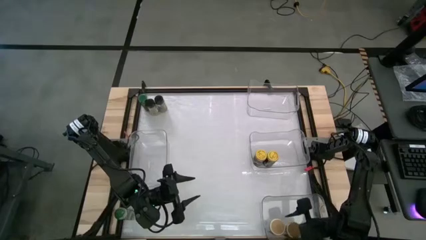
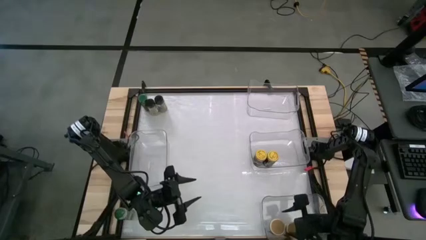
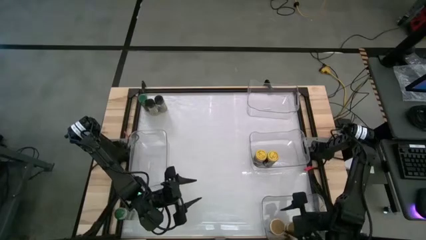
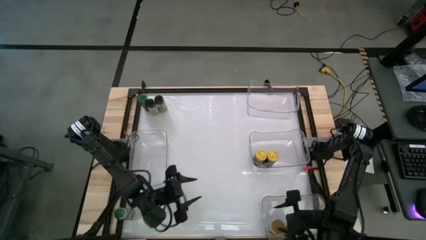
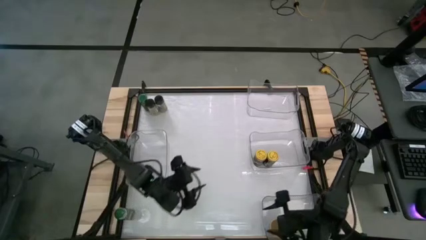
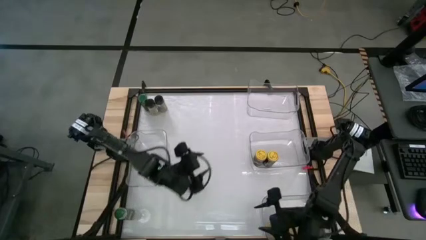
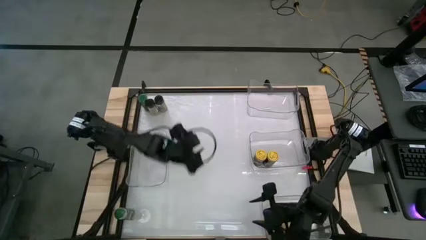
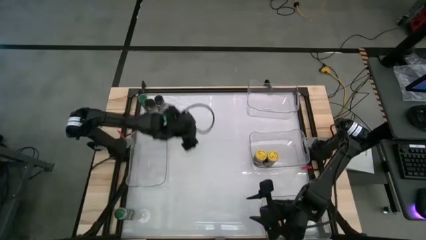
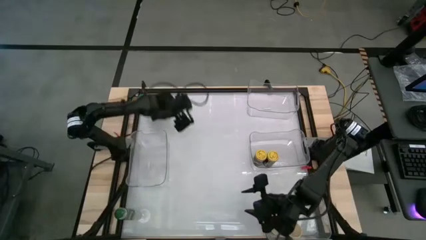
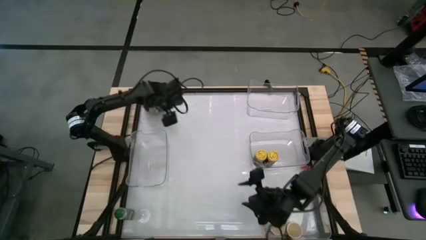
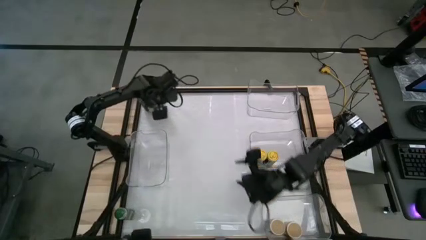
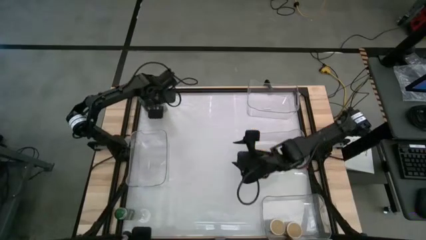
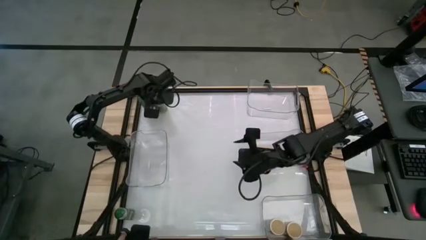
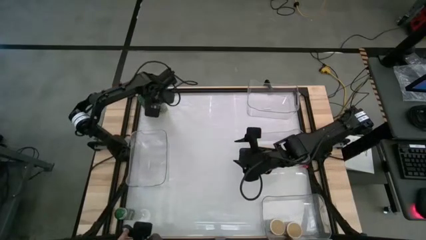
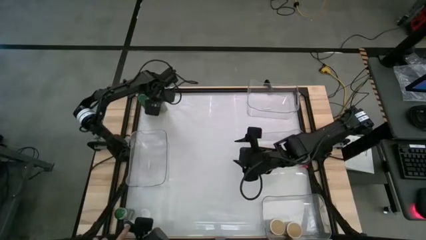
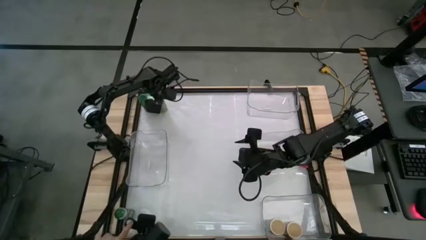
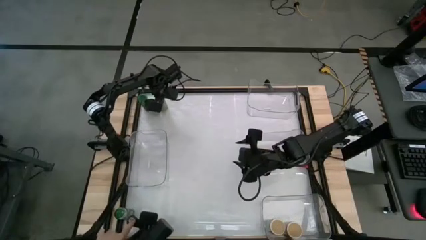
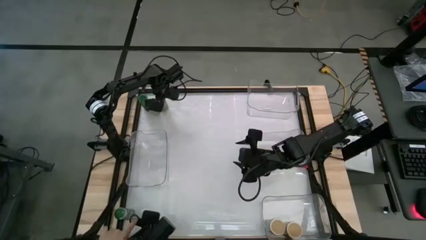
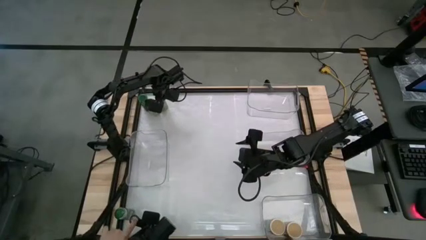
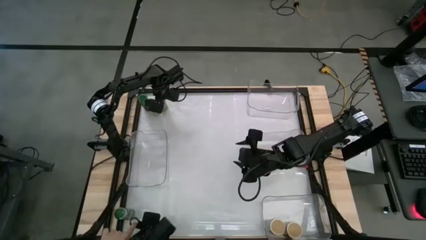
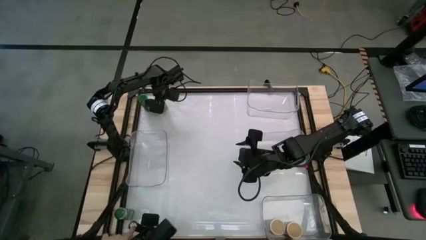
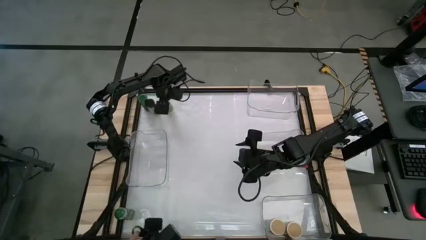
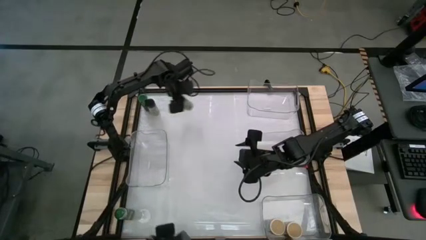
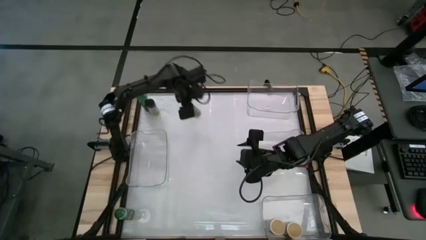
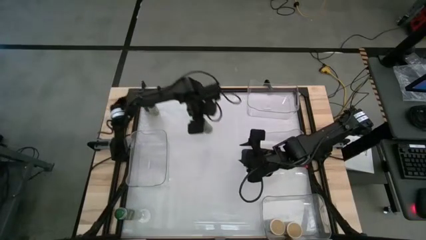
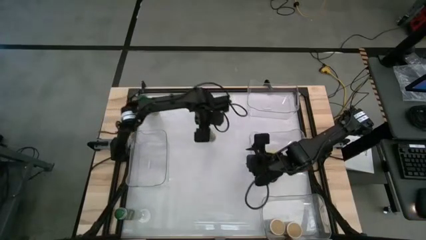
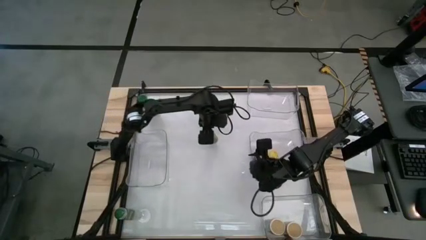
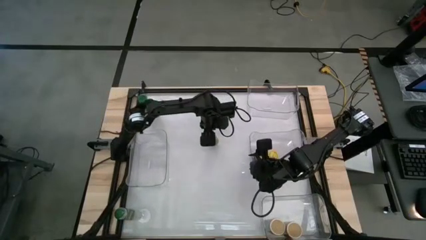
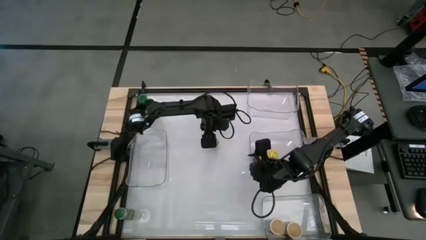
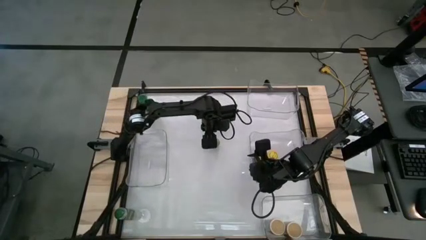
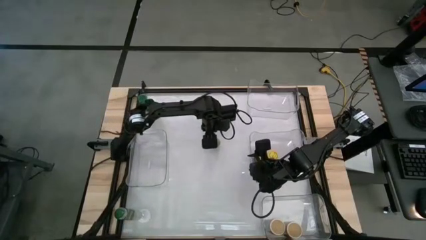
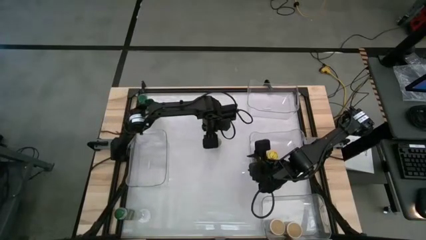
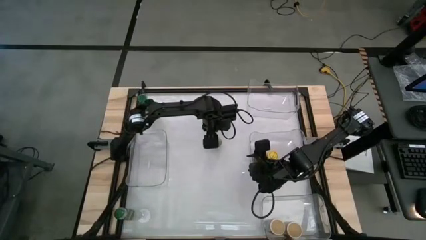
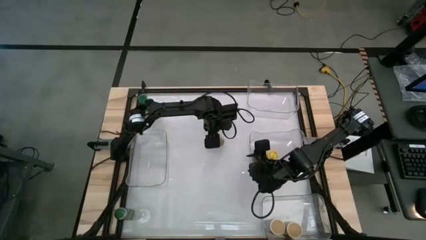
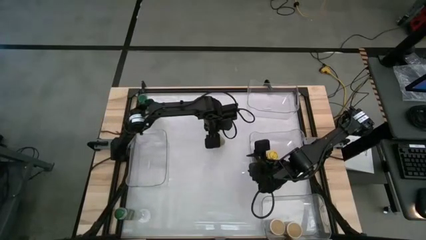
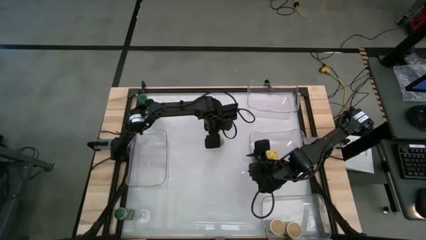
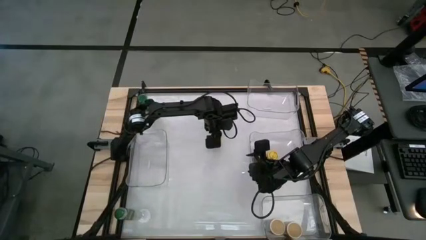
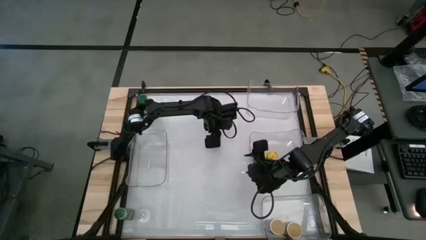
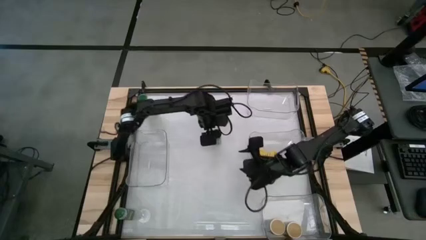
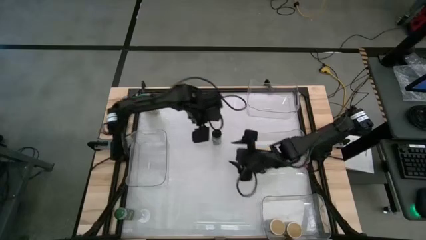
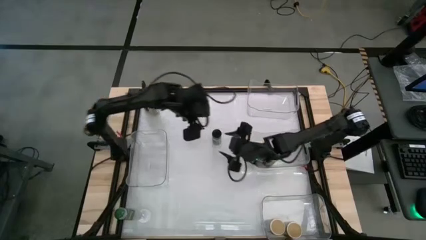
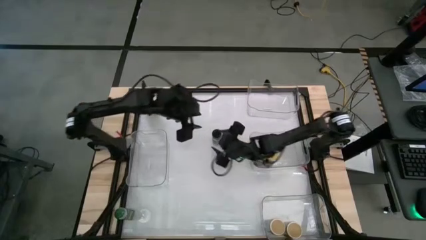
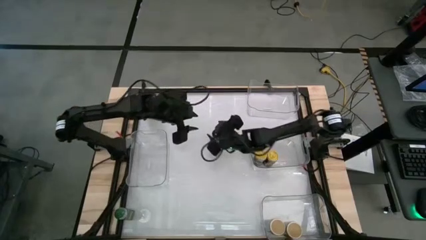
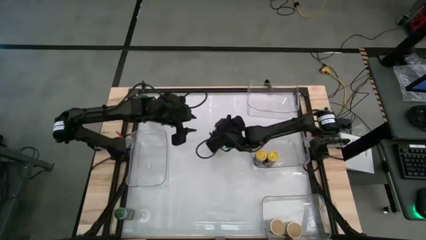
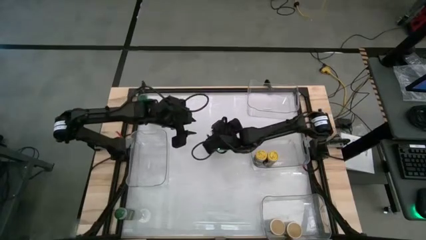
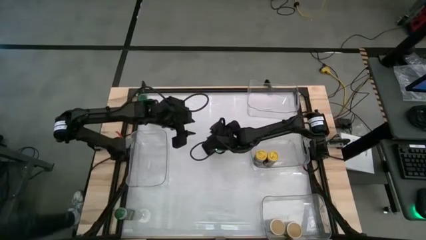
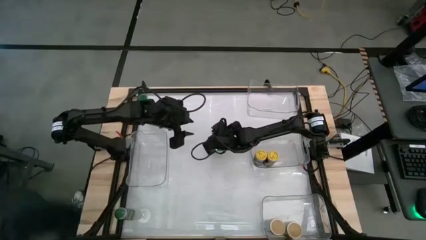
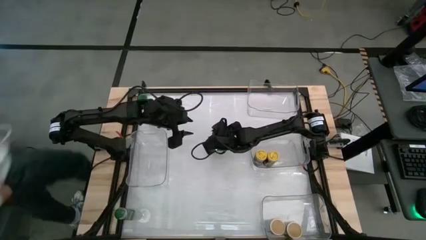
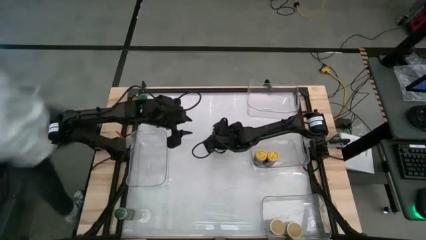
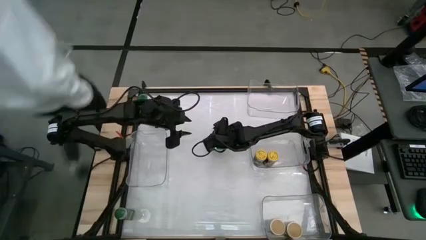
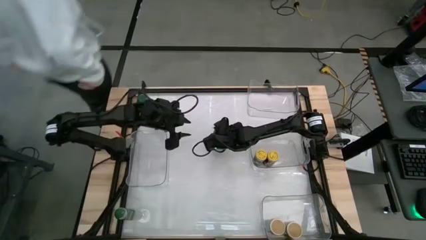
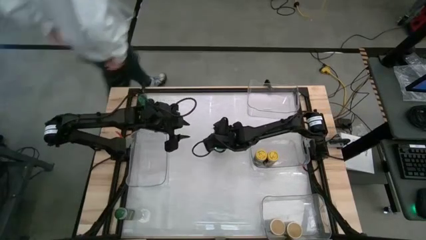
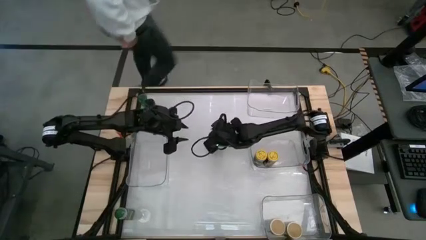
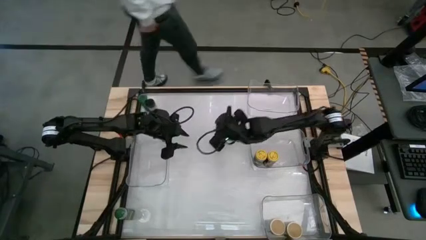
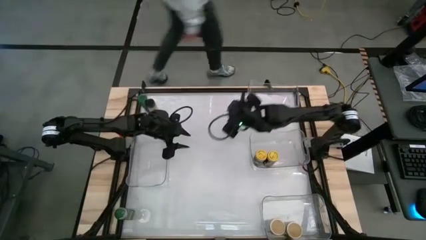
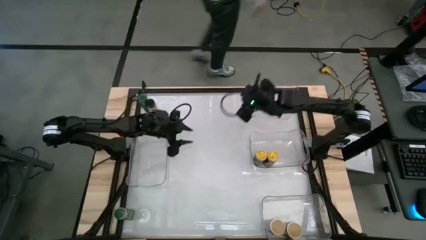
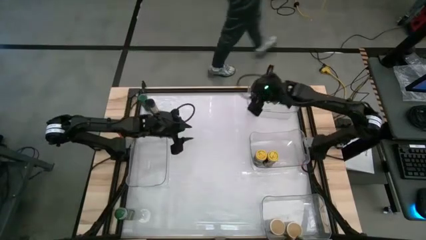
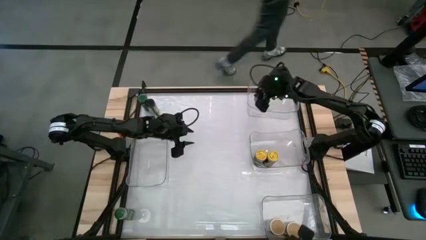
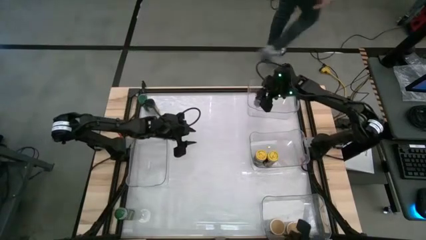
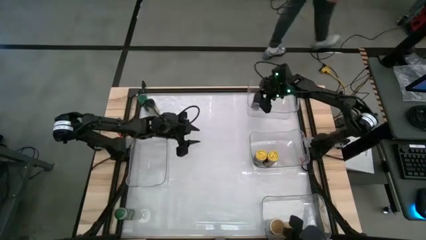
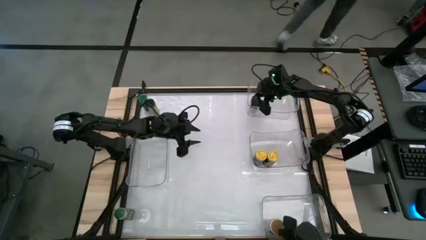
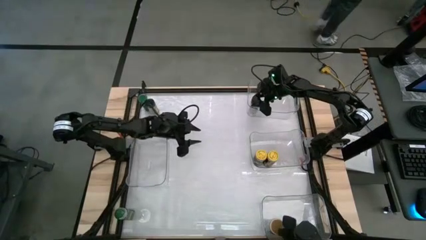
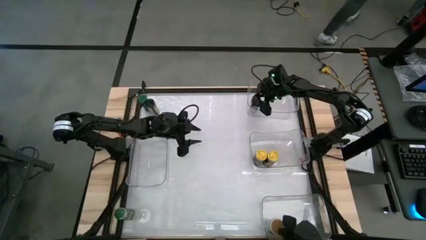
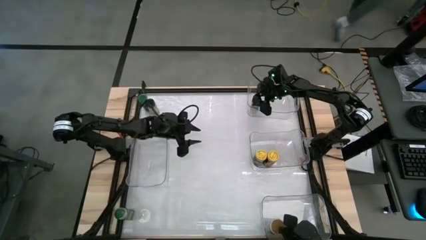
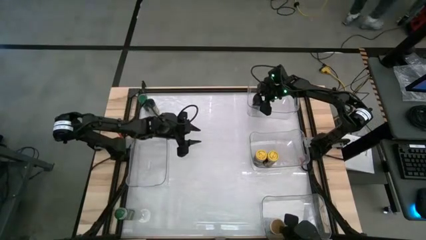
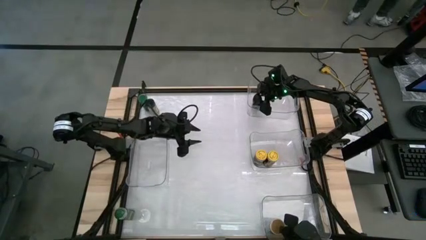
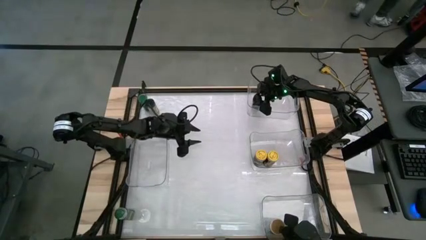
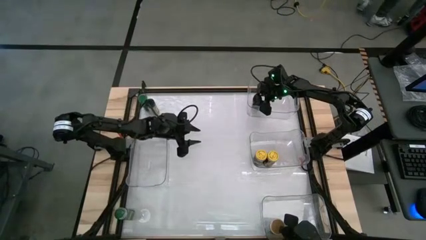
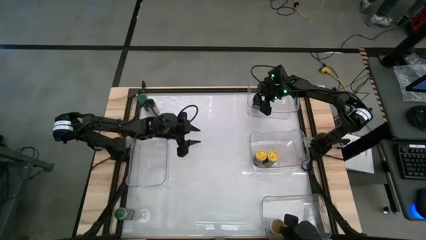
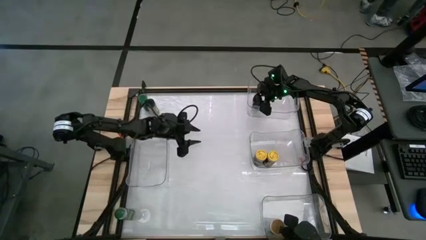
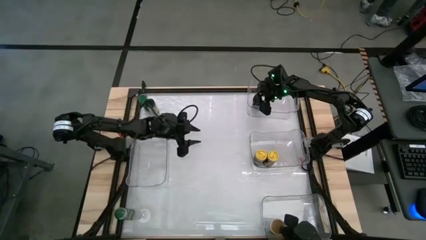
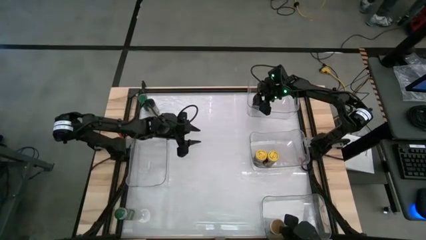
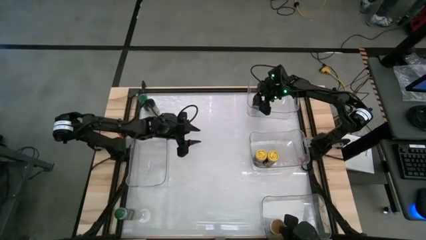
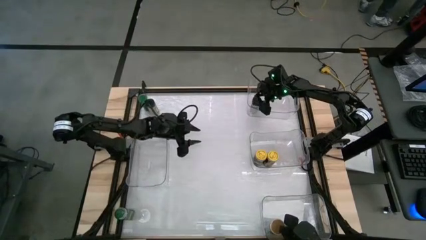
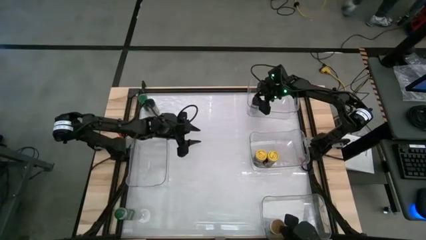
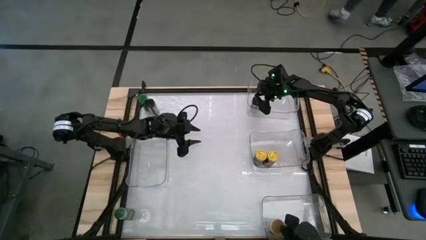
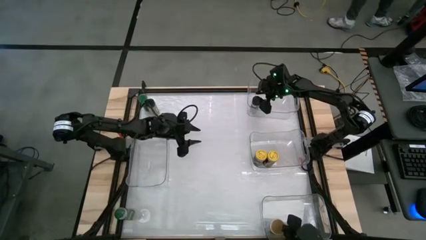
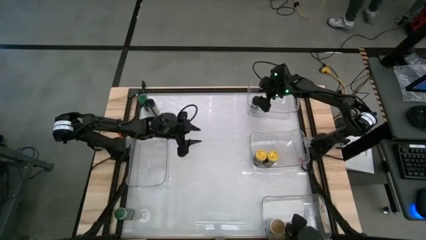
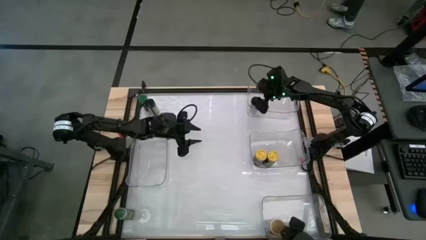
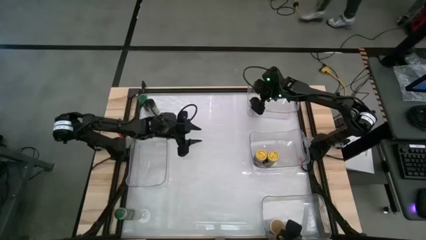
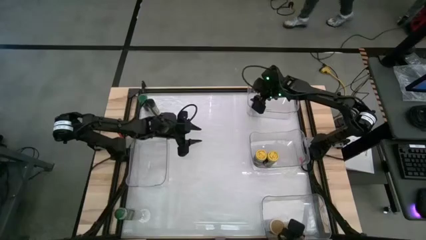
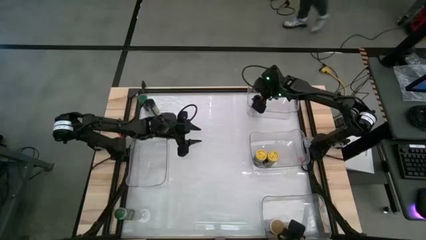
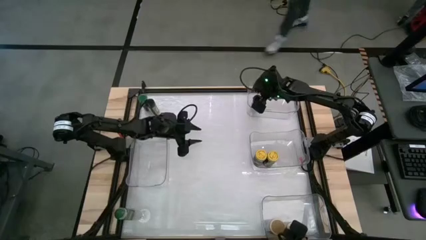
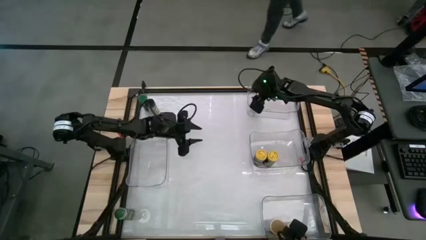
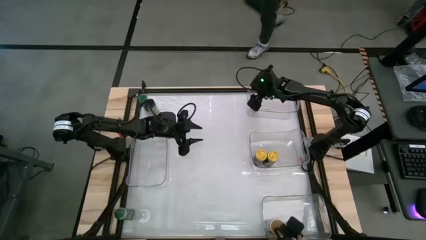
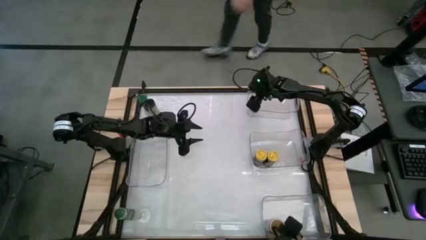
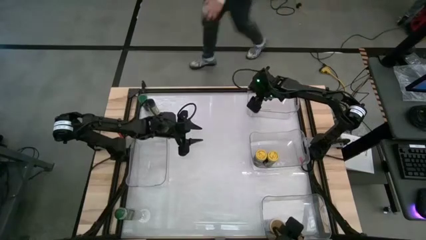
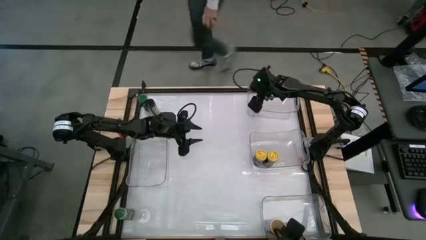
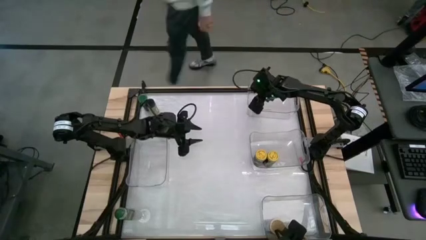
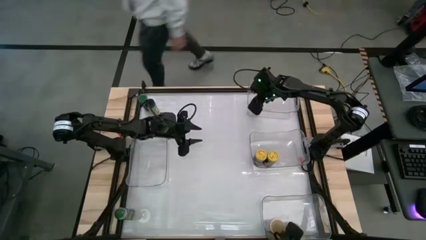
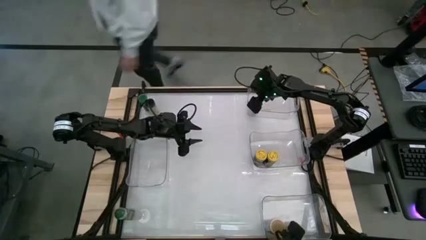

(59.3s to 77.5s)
Task: Sort spices by type
Put the right black seasoning bottle into the top right transparent bin
